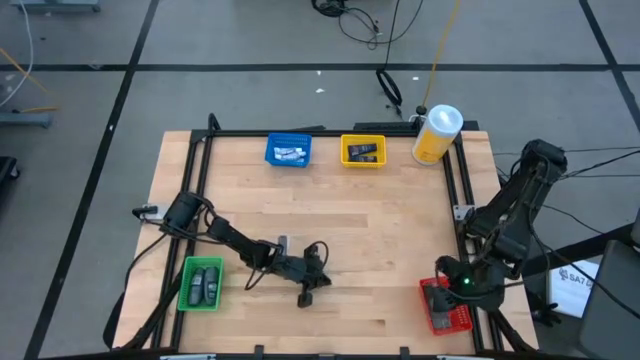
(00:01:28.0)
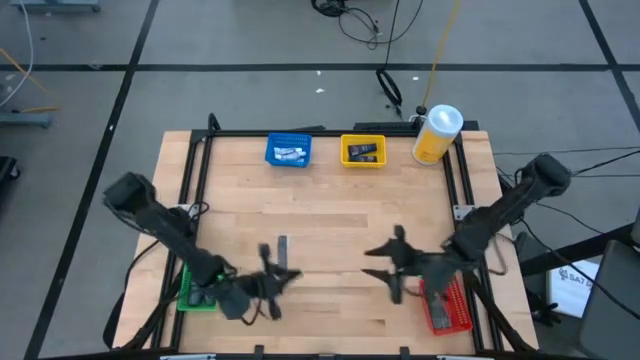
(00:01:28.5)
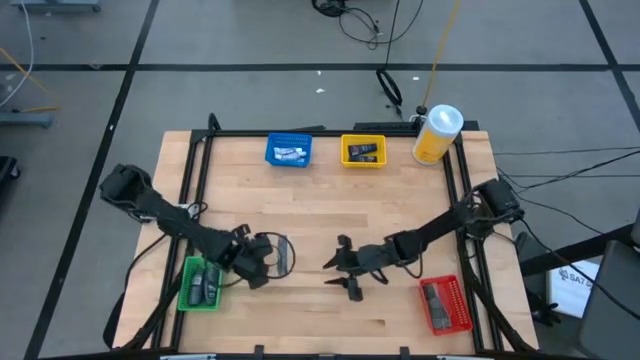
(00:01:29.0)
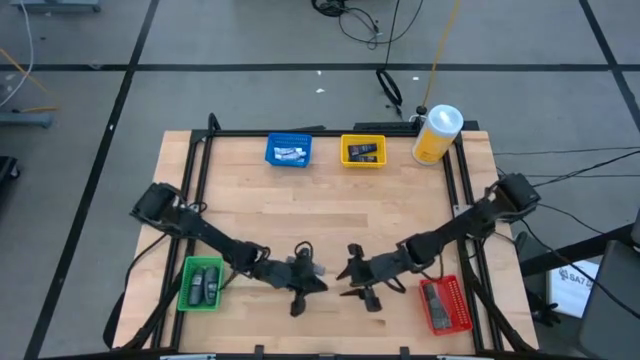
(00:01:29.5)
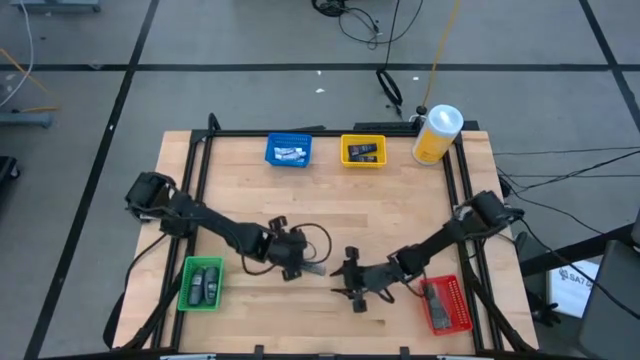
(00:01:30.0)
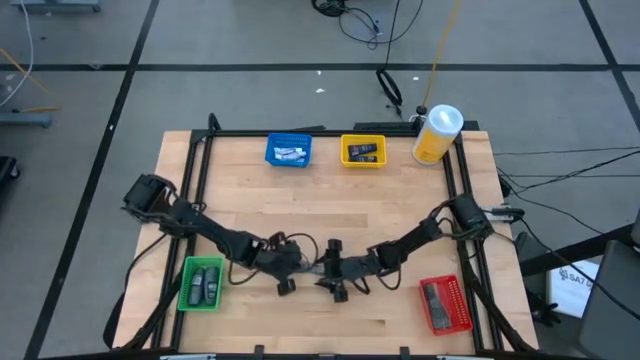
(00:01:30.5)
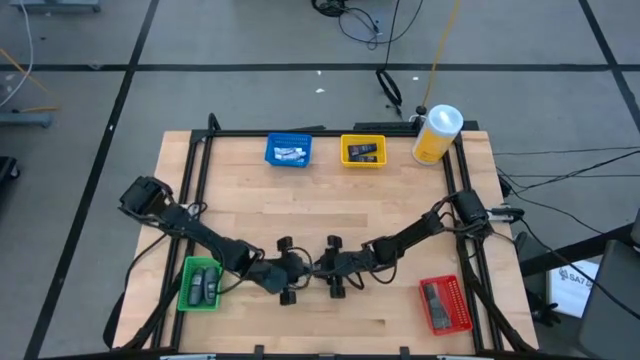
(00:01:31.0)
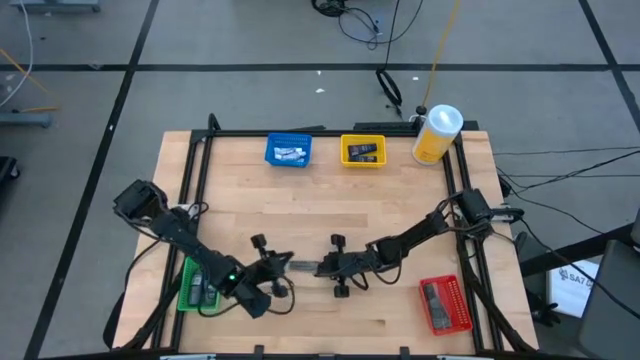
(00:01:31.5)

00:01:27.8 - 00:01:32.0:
Task: Pick & Place Travel size toiletries
Put the black hair comb into the red bin

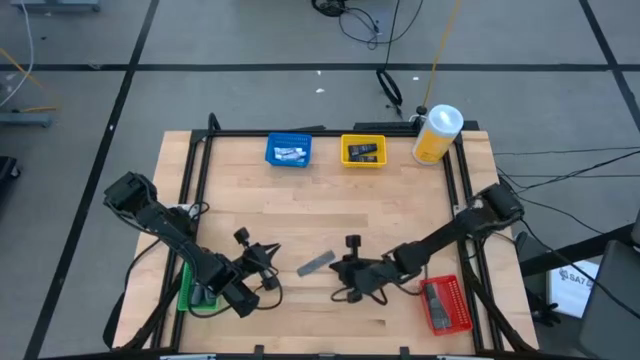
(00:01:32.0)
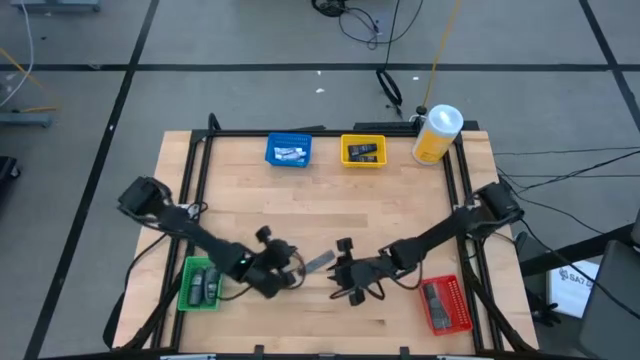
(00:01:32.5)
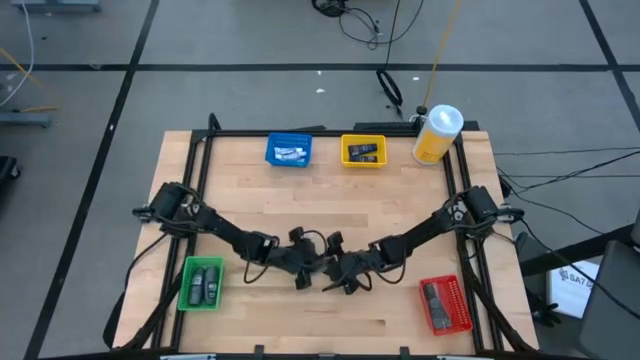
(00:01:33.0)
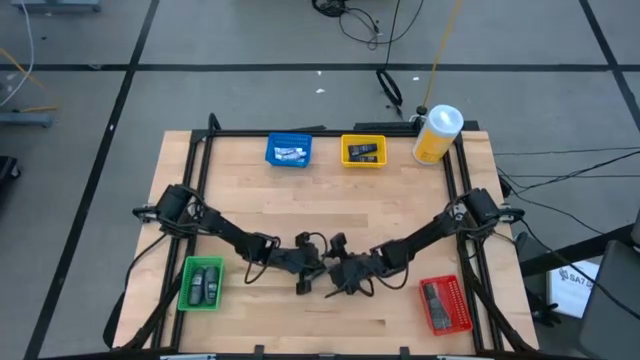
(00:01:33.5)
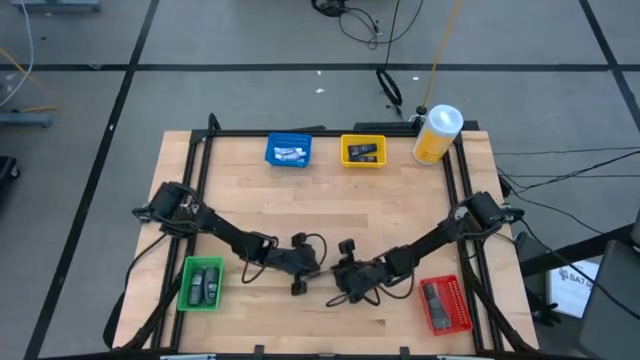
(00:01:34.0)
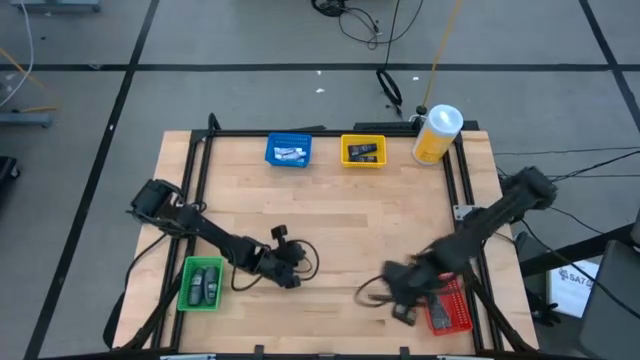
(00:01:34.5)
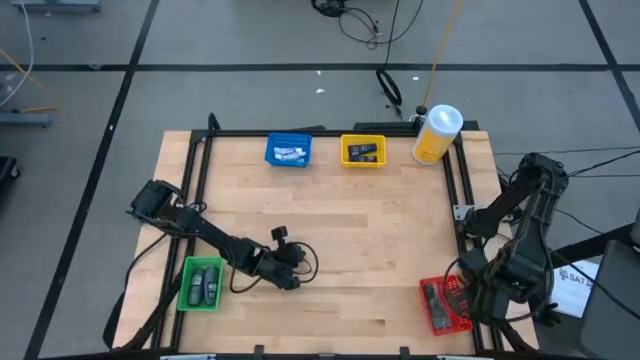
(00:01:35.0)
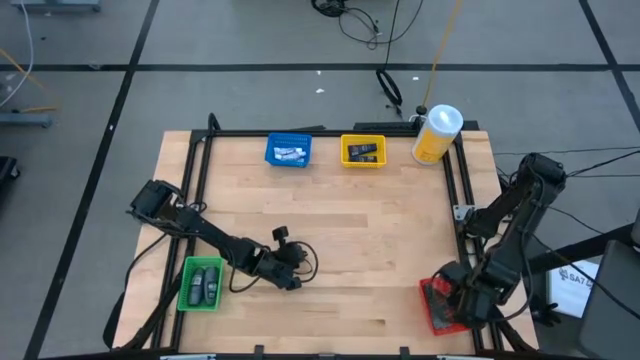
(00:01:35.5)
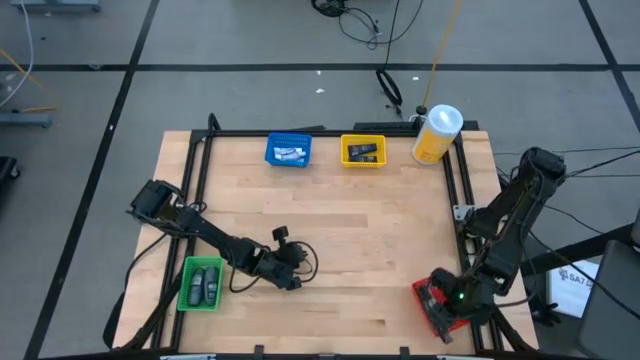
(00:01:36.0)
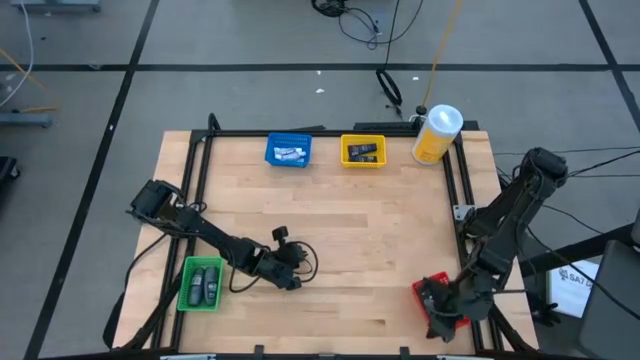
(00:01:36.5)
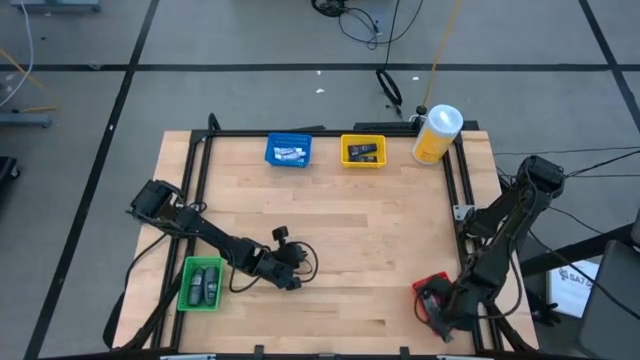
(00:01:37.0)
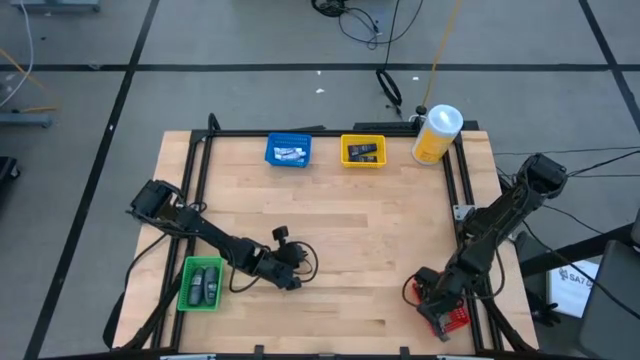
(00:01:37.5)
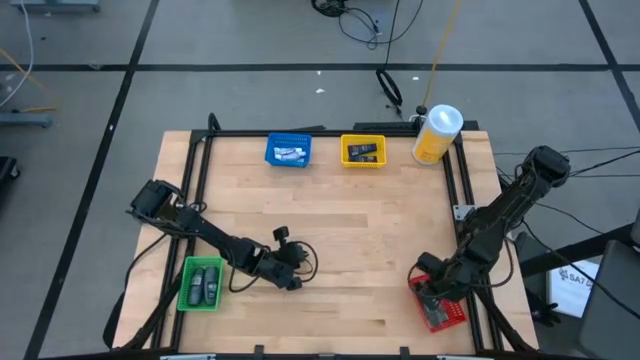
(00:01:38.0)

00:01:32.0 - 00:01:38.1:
Put the black hair comb into the red bin

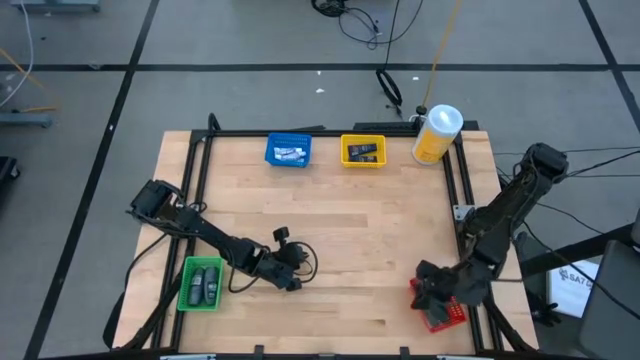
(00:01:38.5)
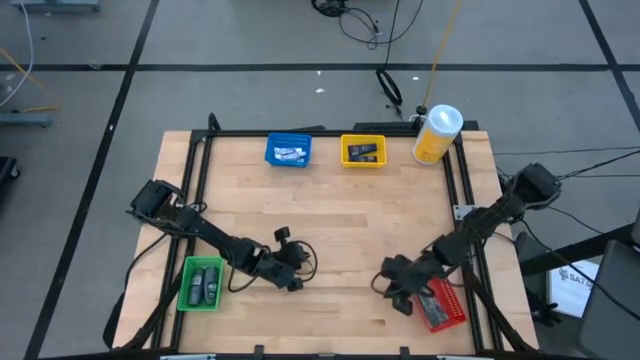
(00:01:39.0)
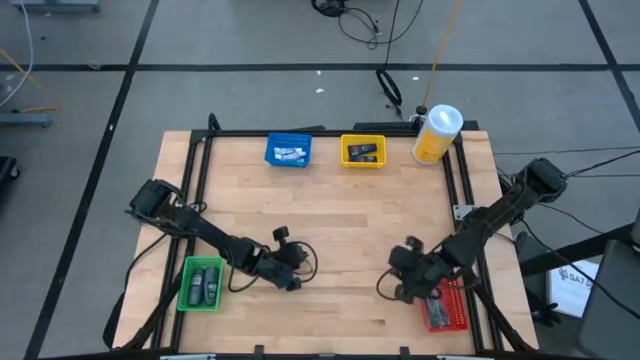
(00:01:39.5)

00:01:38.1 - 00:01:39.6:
Adjust the red bin

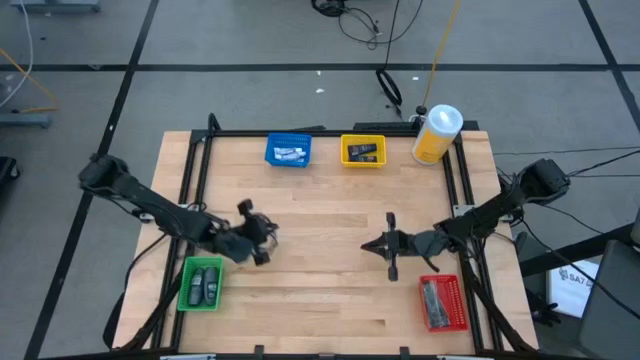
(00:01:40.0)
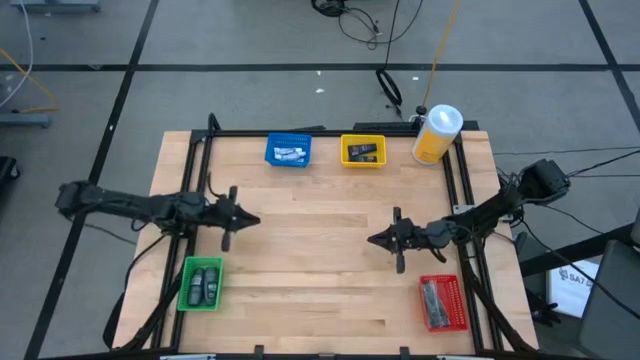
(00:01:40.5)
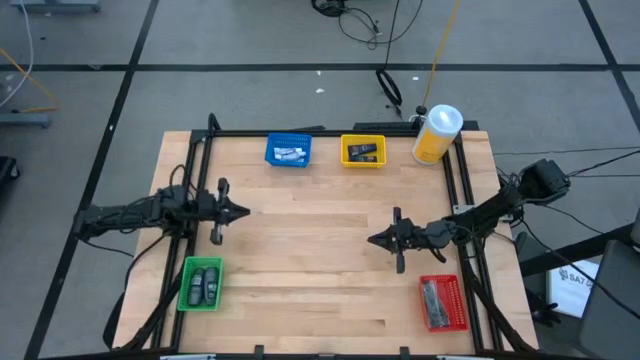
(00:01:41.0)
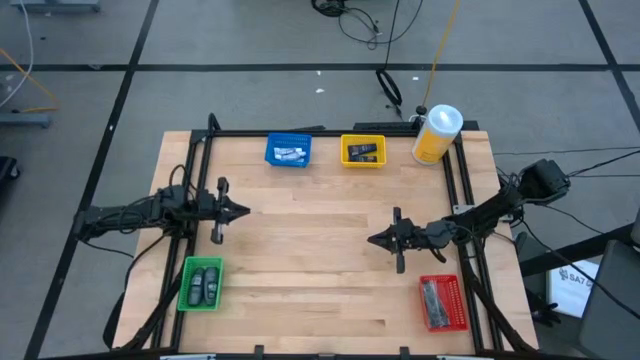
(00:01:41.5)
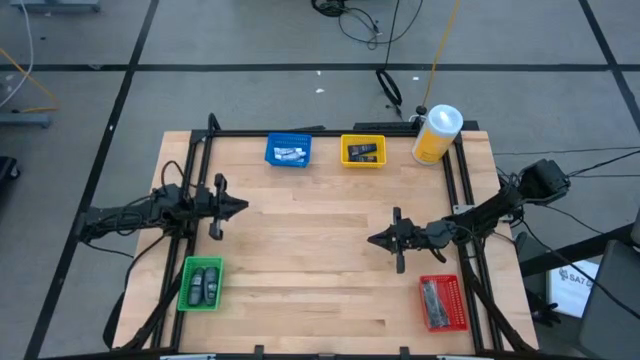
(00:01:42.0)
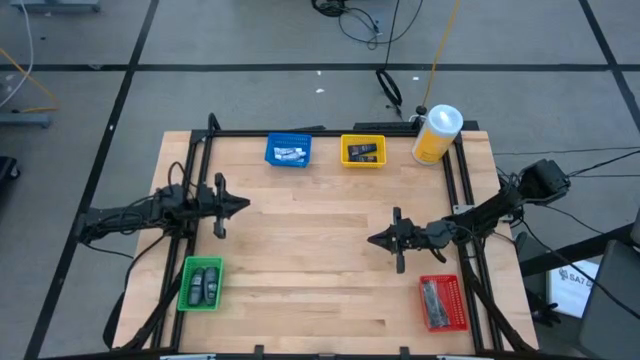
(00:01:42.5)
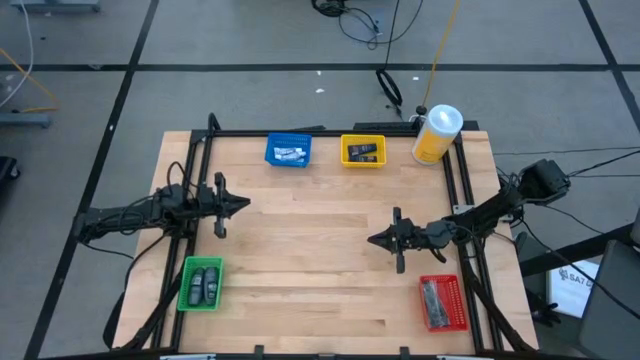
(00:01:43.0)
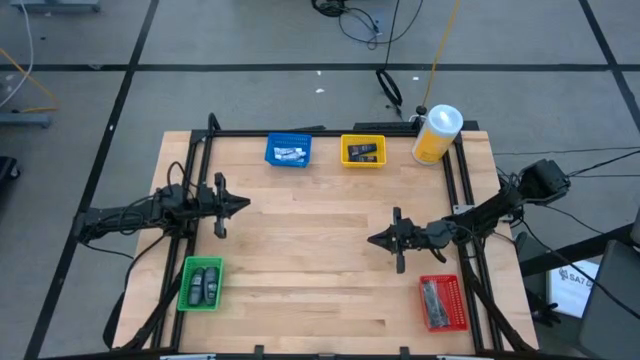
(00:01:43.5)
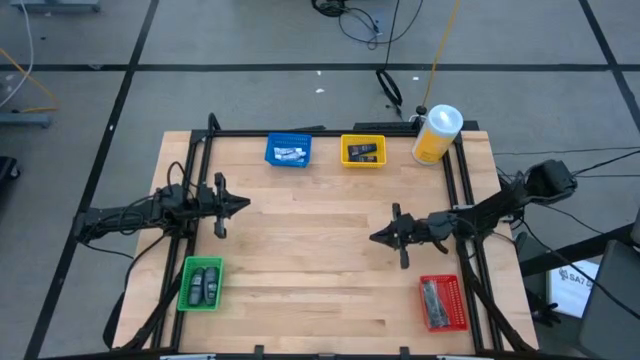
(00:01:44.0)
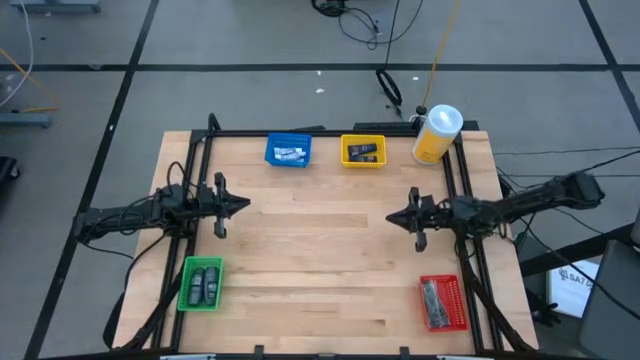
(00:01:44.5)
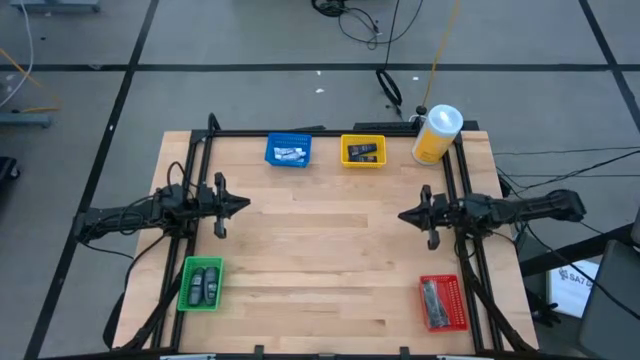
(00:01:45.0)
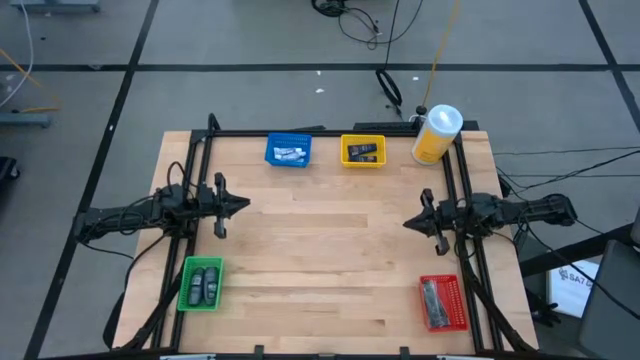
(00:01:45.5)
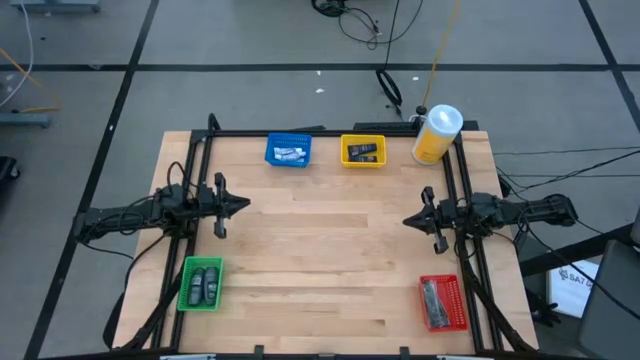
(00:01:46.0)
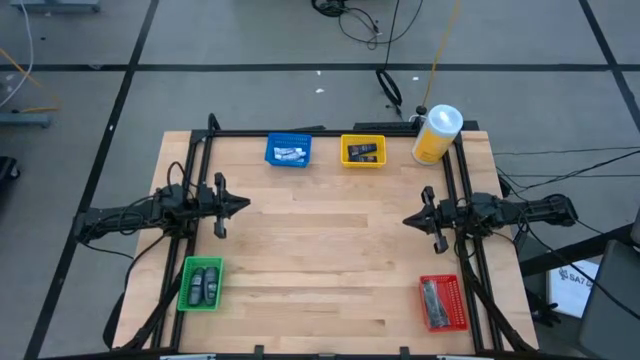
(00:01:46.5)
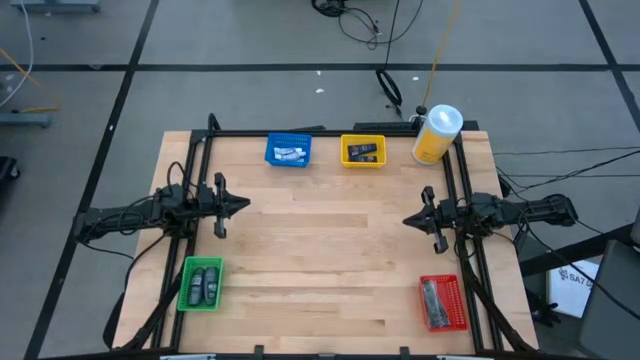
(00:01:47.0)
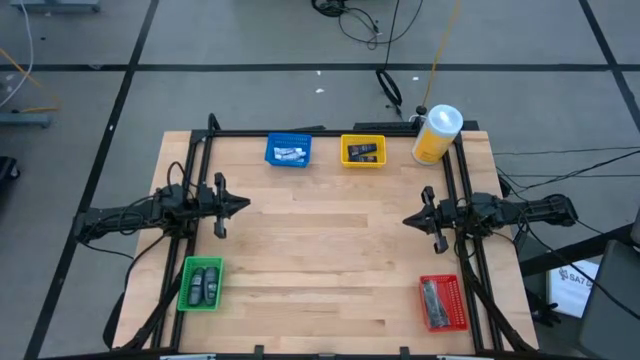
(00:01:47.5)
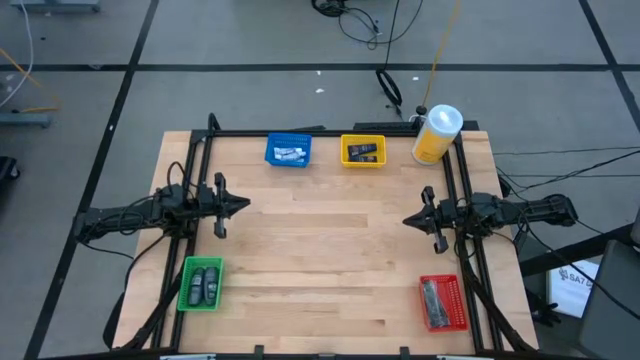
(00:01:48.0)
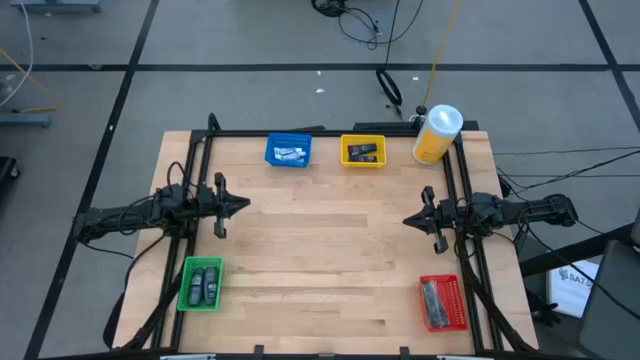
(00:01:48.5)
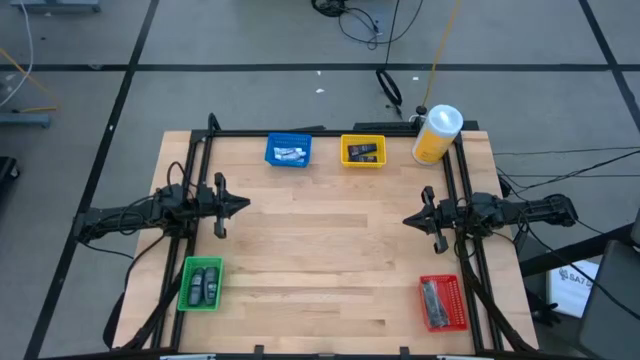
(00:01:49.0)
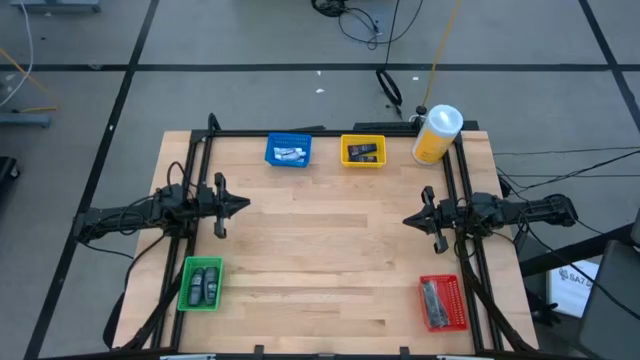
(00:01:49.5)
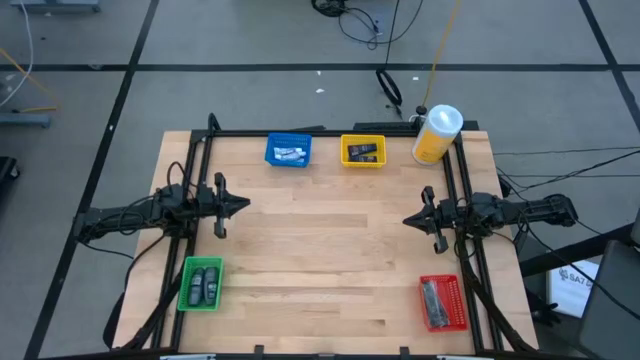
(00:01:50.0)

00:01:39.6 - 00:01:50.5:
Return to Home Position
